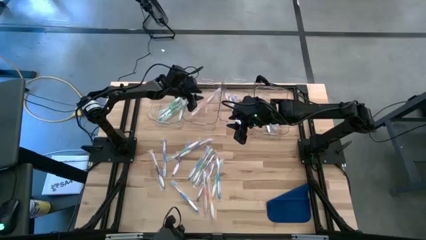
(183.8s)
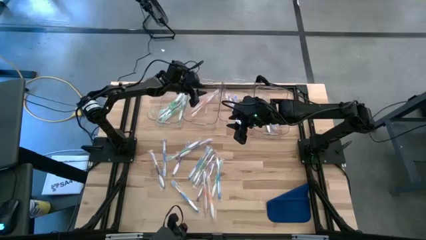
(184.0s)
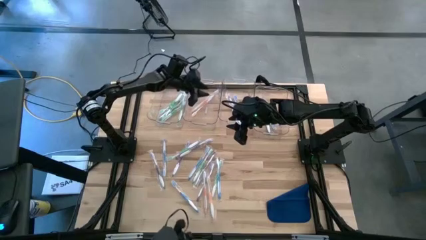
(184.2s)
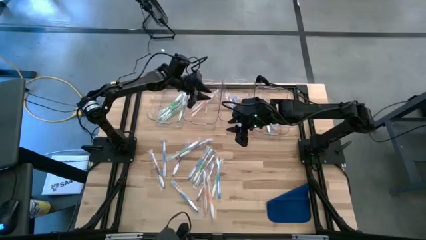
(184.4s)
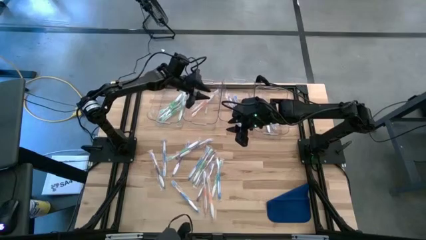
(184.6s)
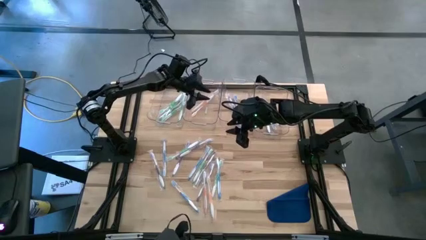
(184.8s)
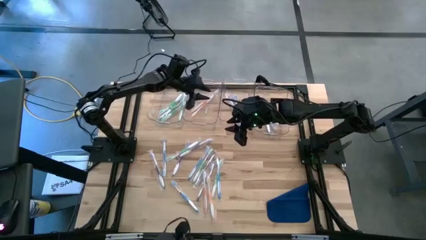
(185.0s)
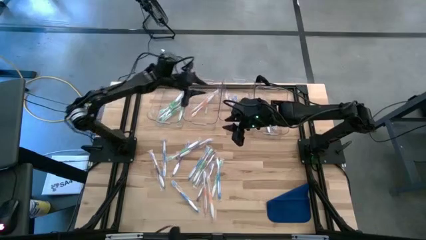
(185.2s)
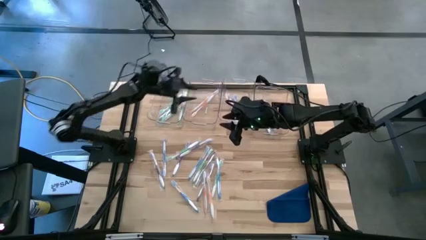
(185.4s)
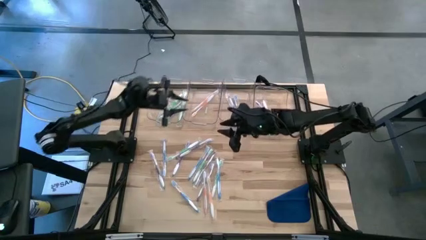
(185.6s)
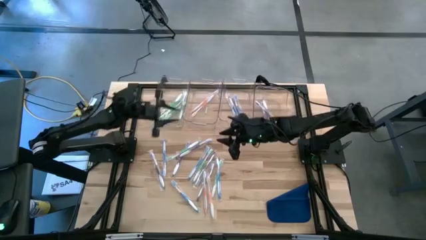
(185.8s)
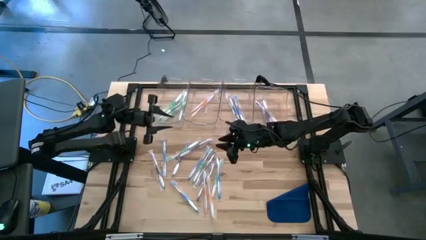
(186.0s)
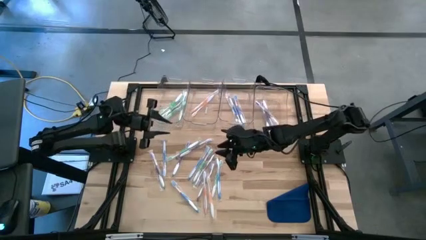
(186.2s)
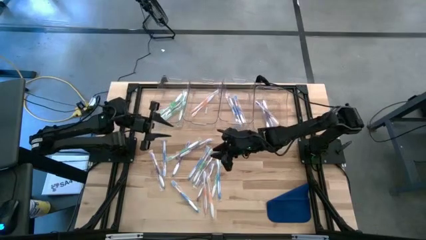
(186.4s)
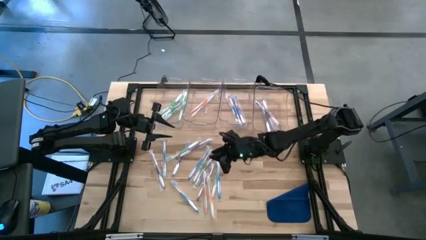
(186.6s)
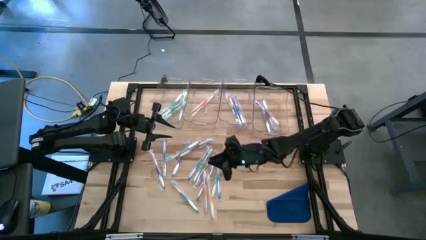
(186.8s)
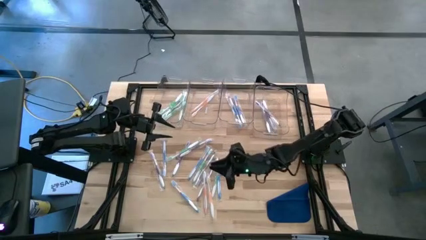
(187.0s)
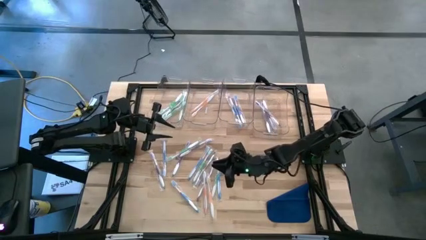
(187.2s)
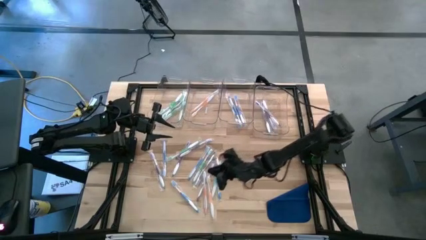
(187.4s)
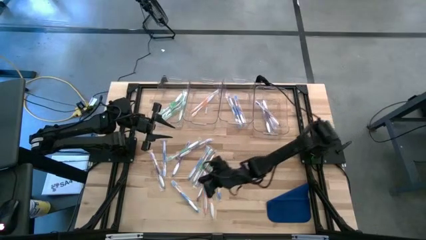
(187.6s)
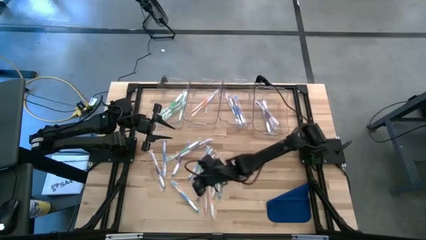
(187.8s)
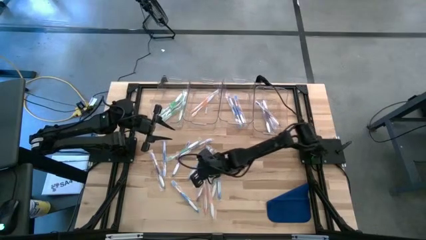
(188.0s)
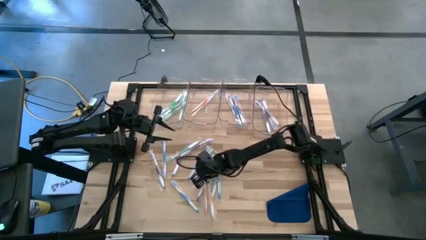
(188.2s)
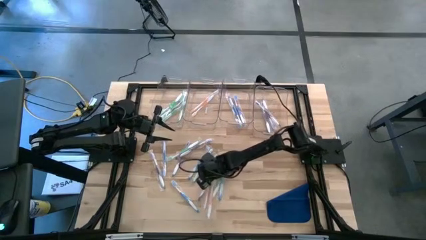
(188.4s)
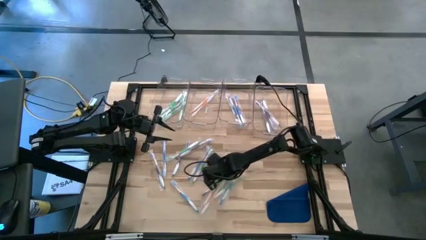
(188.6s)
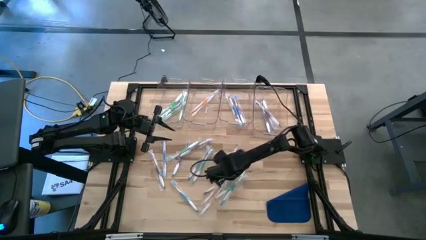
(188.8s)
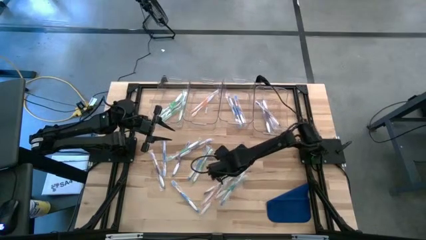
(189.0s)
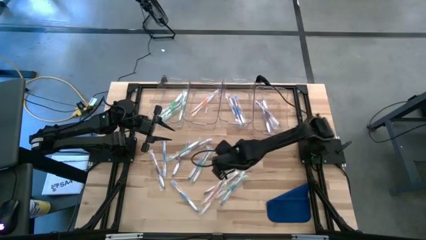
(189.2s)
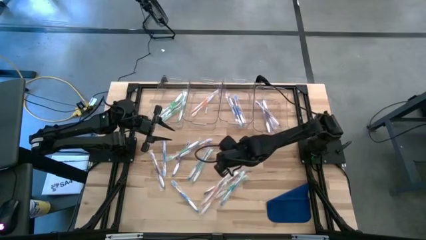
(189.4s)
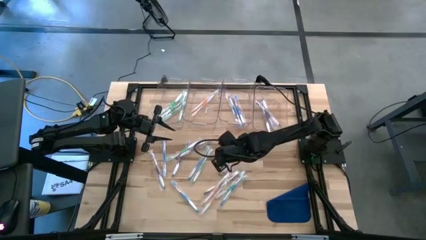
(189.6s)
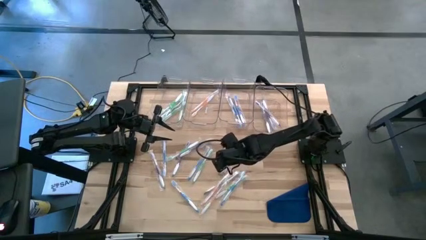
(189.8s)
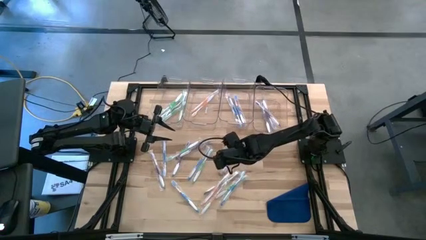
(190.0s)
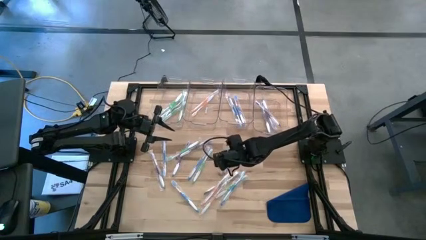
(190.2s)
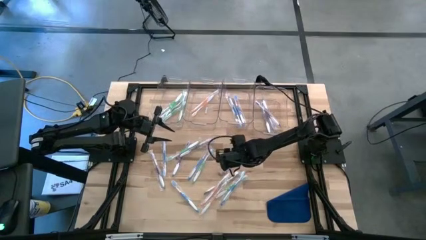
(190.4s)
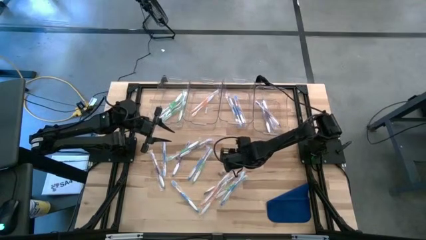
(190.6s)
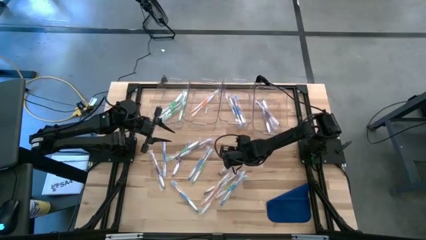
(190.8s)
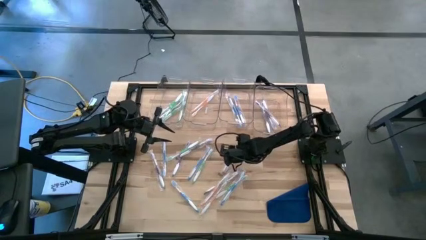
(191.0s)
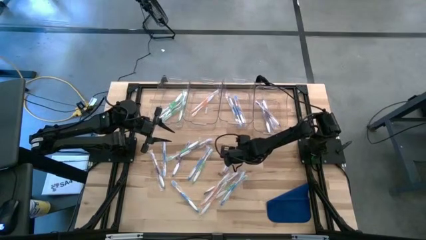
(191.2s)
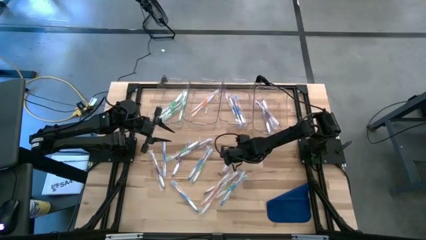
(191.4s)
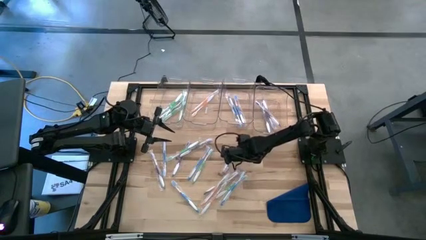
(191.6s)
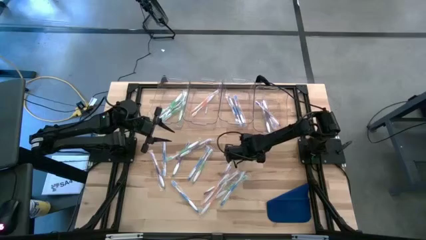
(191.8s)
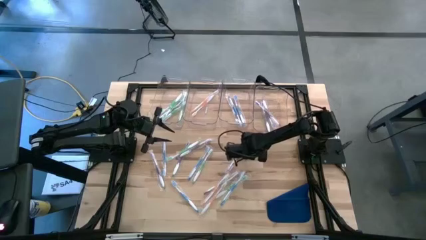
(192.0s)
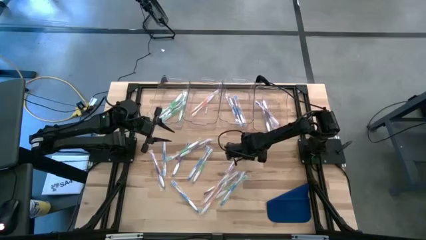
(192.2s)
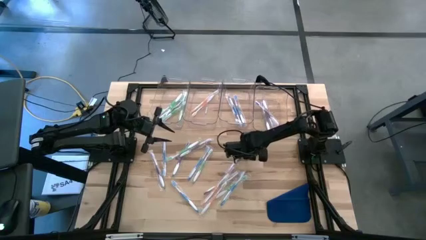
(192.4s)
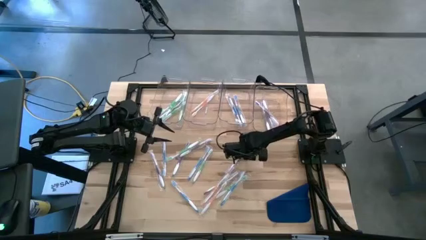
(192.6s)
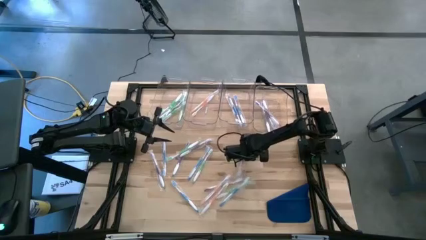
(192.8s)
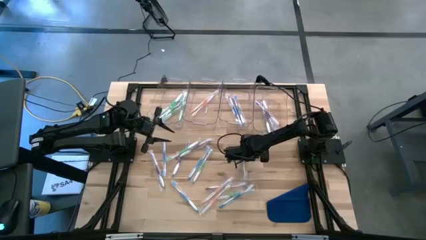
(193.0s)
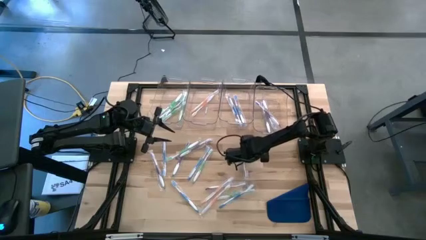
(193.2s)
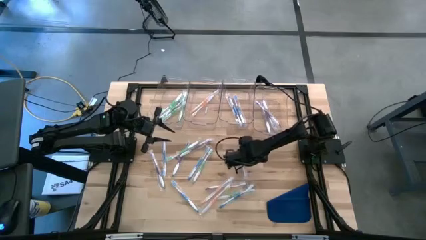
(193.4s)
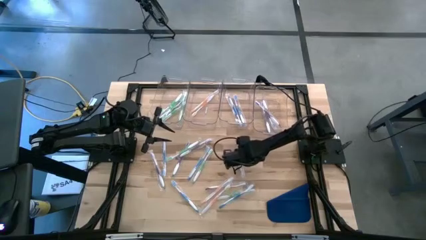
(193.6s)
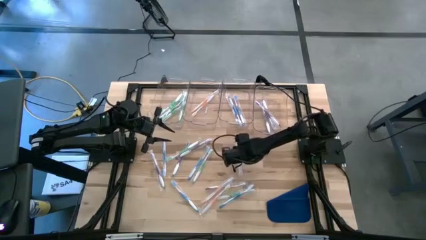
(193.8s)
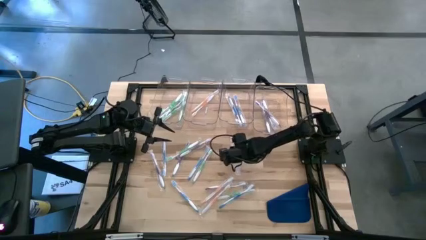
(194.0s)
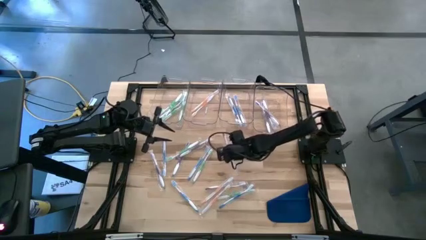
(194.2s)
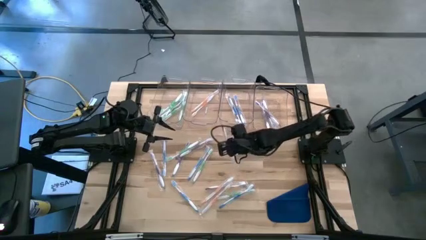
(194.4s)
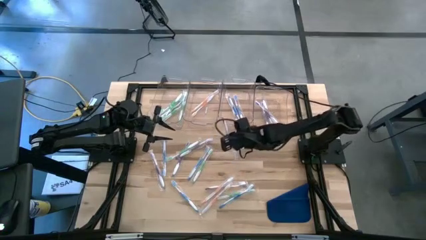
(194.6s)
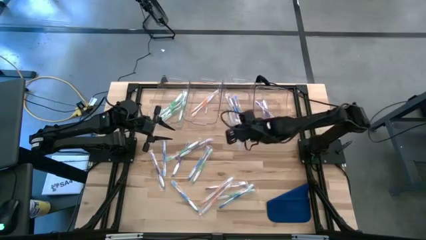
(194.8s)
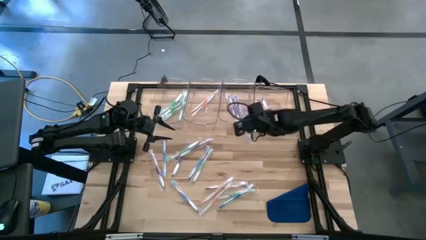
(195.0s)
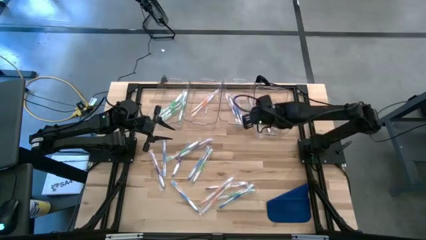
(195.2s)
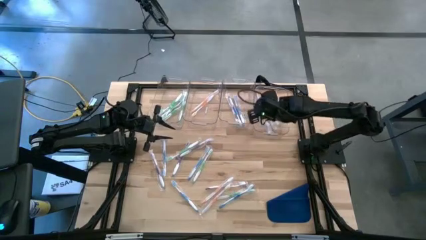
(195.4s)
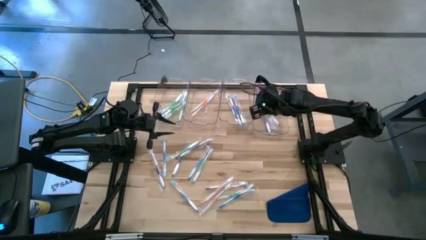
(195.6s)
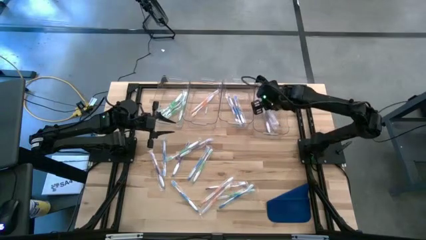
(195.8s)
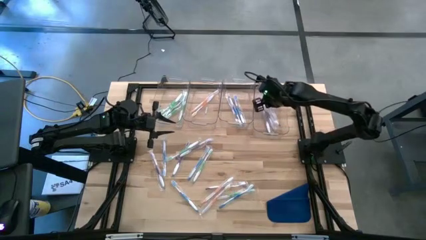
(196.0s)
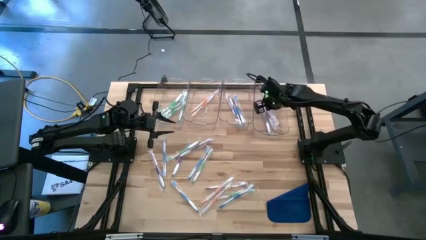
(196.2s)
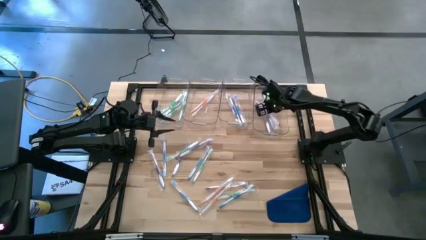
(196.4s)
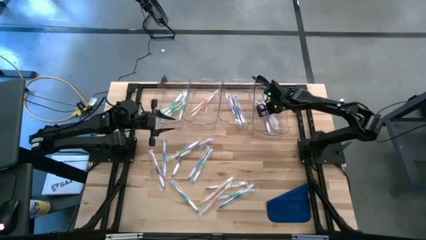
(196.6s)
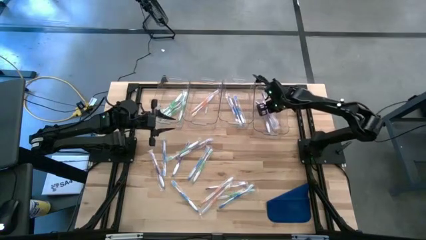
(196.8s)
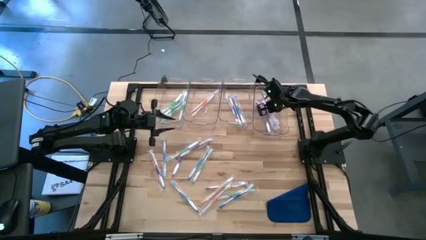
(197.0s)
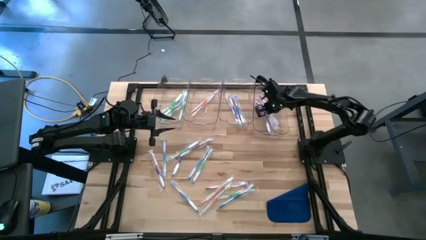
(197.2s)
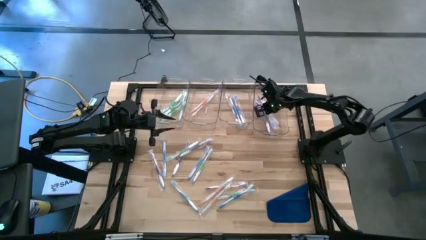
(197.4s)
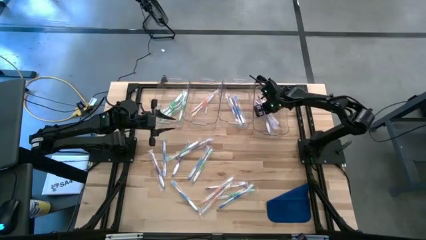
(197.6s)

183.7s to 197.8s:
Task: Pick & Place Toothbrushes
Put the violet toothbrush into the right transparent bin

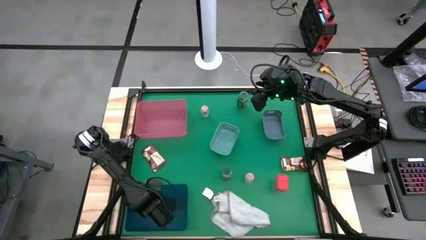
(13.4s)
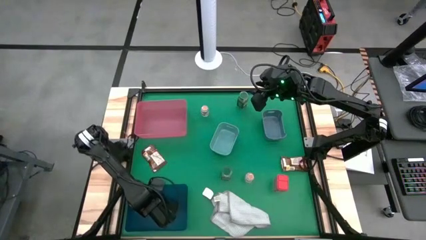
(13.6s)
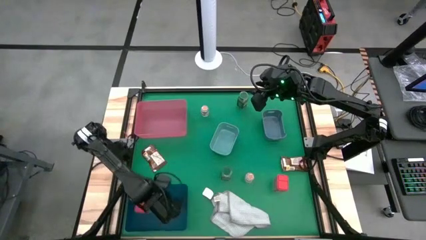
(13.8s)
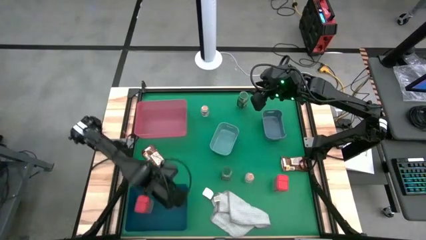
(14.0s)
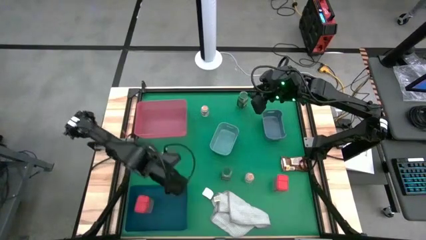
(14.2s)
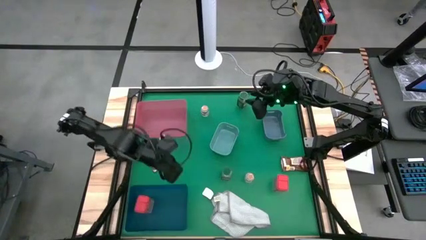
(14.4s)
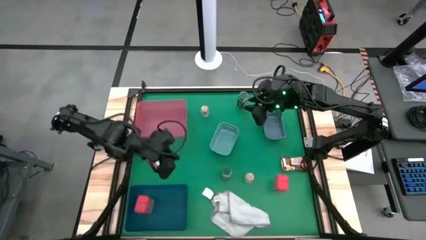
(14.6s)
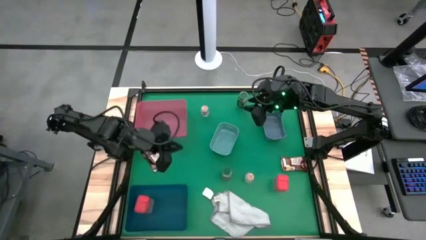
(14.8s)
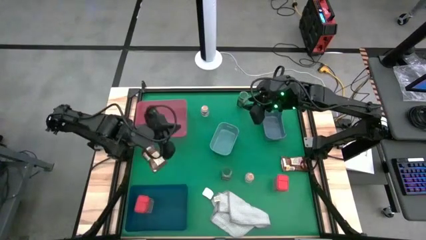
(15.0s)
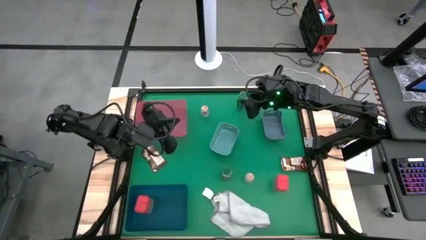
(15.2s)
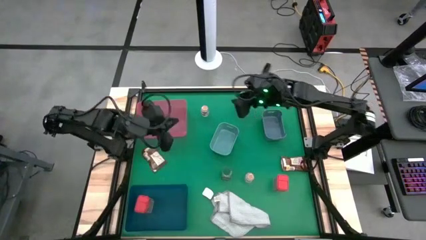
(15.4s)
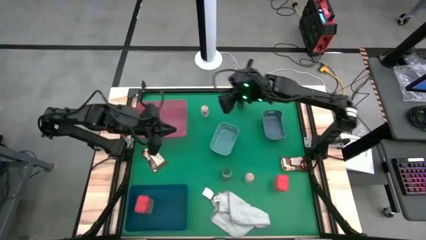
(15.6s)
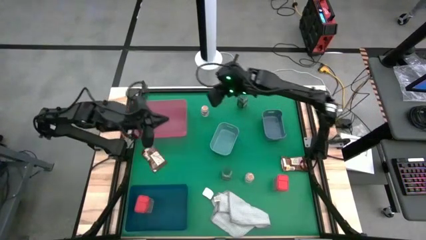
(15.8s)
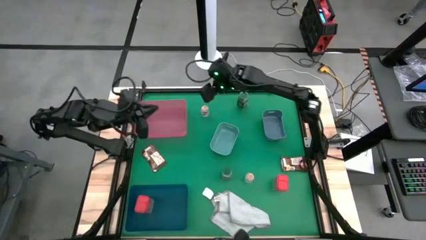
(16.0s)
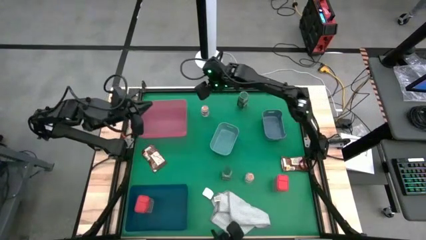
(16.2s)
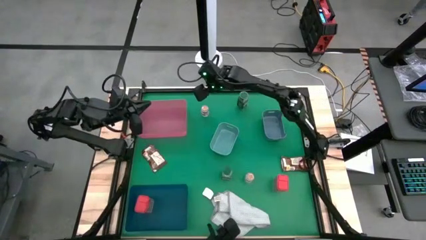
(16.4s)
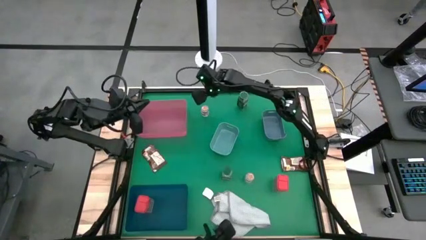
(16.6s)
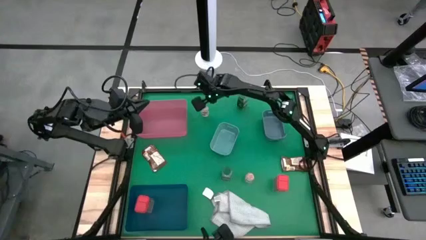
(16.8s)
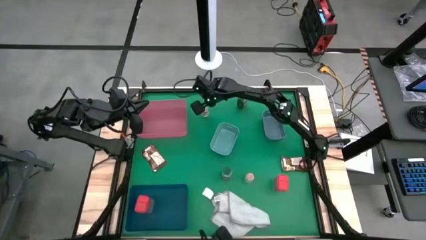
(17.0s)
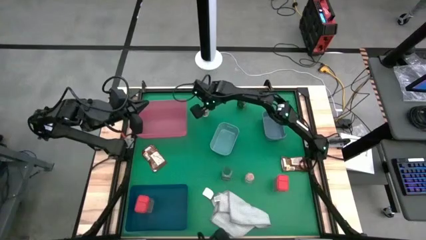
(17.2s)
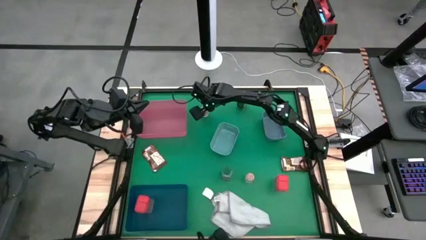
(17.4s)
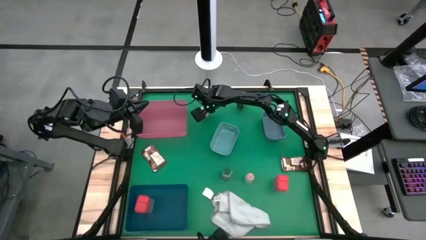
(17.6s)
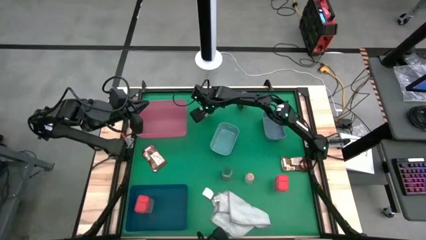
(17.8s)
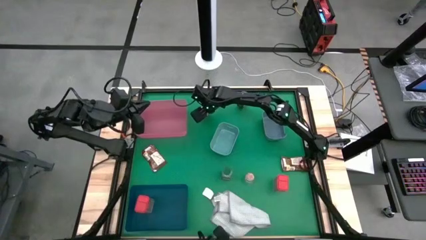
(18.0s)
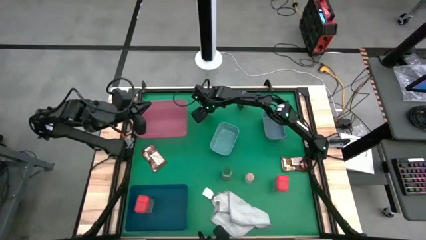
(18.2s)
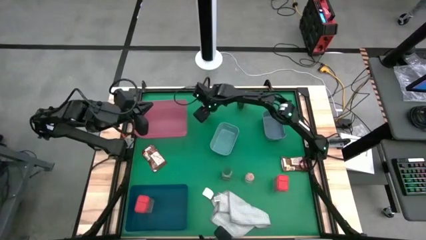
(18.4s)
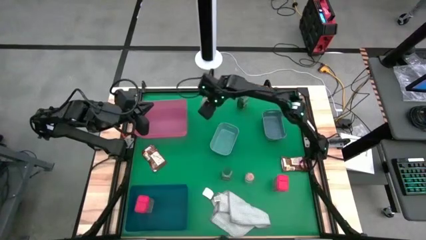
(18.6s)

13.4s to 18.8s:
Task: Sort spices by type
Put the top brown seasoning bottle into the light blue bin
